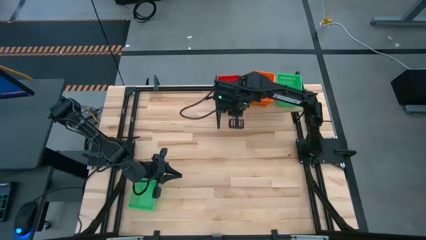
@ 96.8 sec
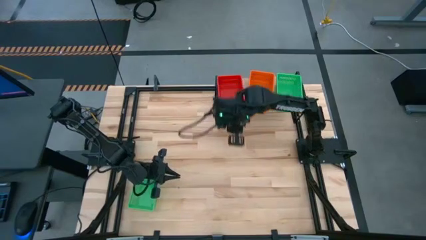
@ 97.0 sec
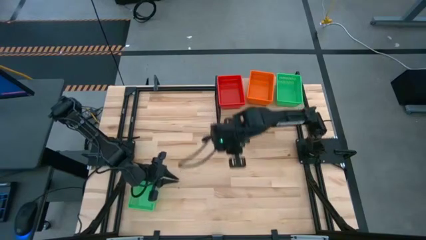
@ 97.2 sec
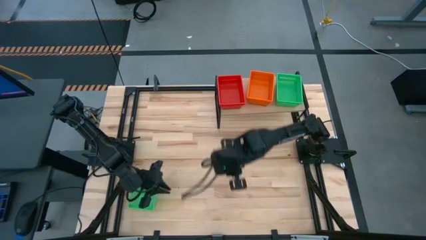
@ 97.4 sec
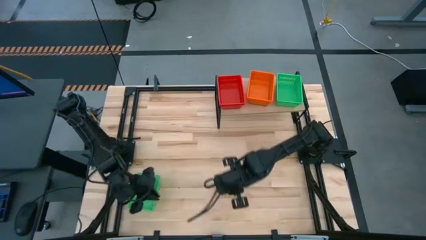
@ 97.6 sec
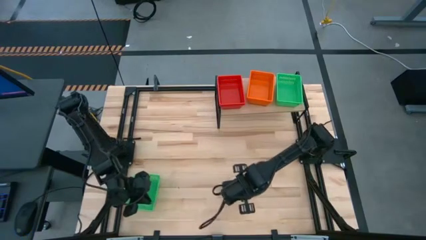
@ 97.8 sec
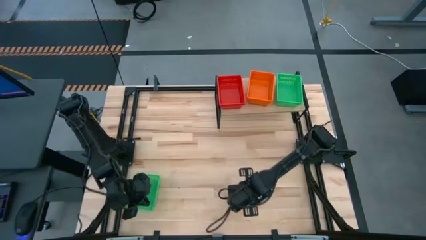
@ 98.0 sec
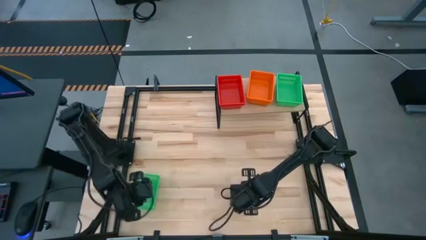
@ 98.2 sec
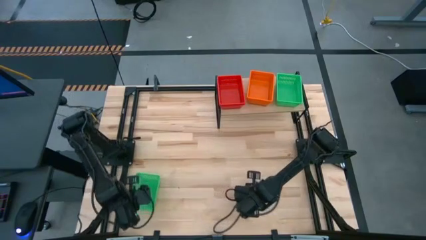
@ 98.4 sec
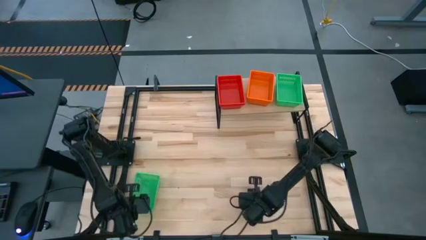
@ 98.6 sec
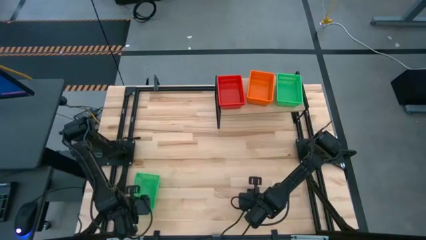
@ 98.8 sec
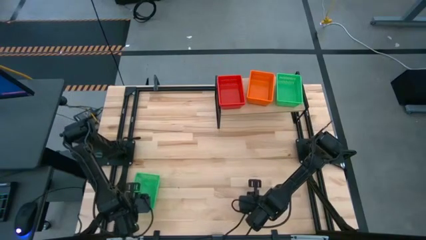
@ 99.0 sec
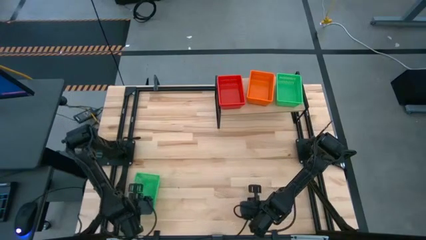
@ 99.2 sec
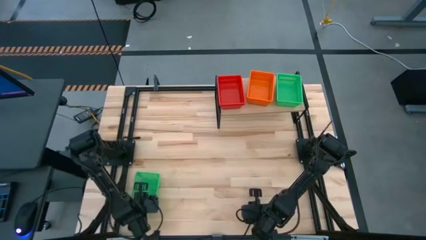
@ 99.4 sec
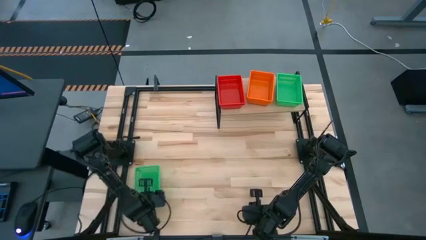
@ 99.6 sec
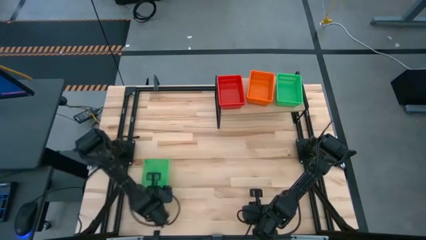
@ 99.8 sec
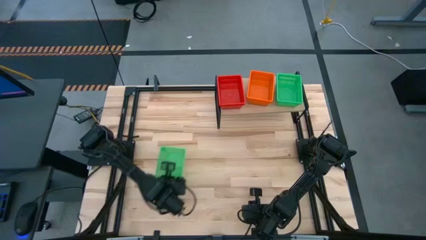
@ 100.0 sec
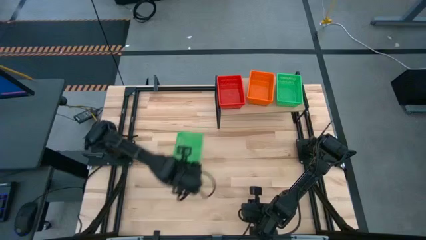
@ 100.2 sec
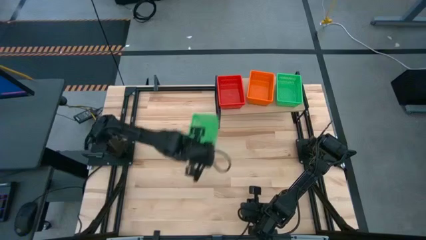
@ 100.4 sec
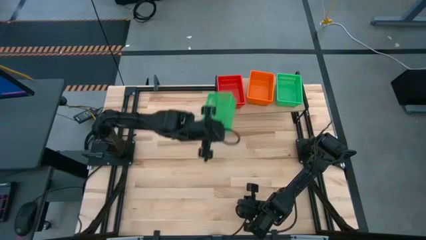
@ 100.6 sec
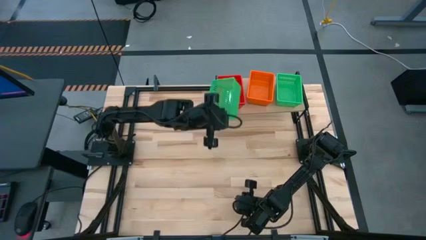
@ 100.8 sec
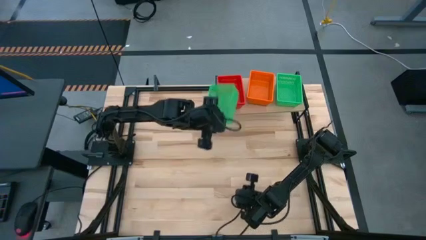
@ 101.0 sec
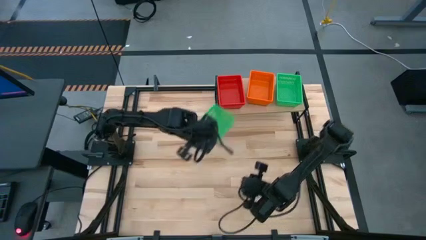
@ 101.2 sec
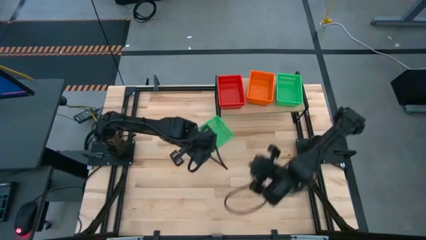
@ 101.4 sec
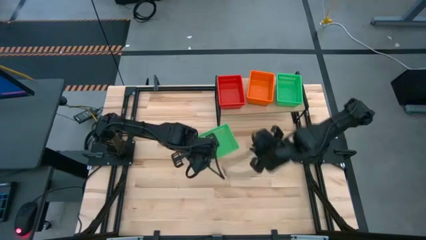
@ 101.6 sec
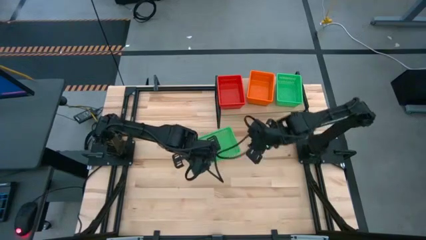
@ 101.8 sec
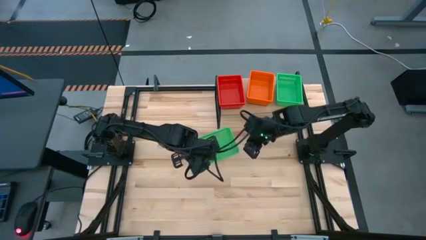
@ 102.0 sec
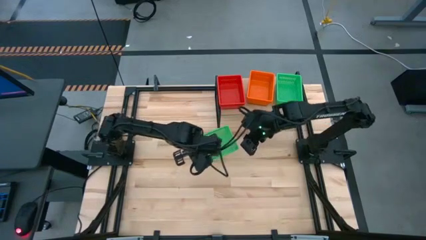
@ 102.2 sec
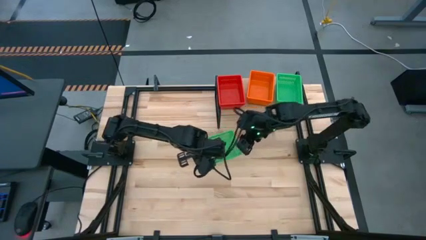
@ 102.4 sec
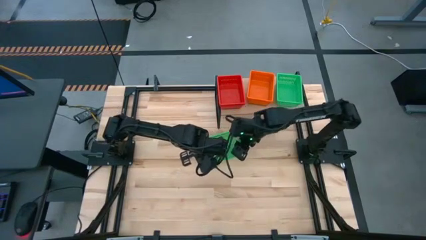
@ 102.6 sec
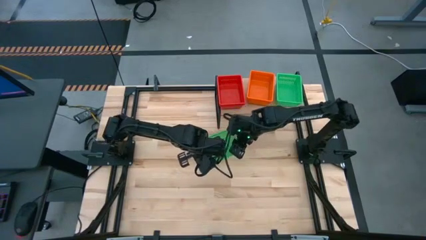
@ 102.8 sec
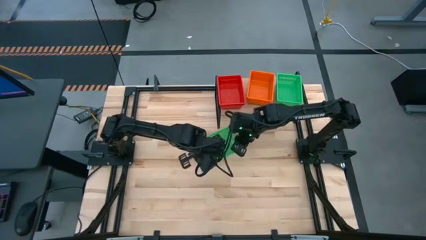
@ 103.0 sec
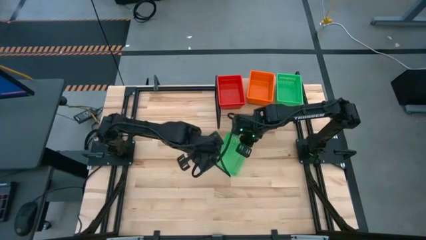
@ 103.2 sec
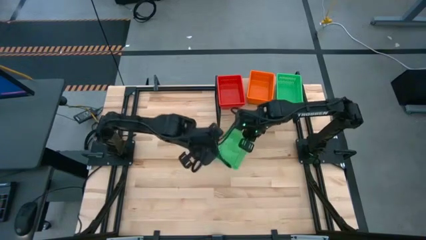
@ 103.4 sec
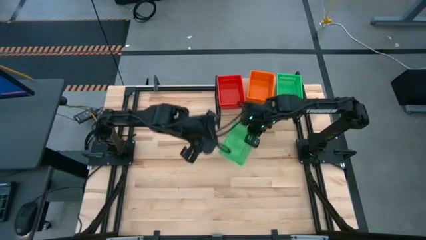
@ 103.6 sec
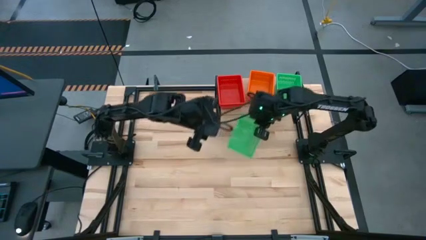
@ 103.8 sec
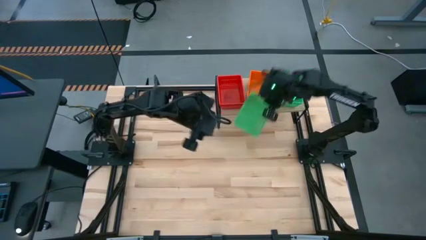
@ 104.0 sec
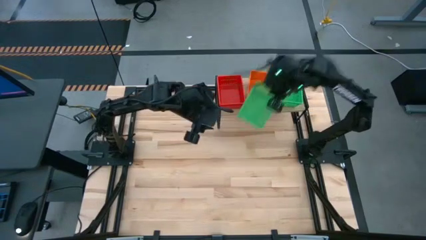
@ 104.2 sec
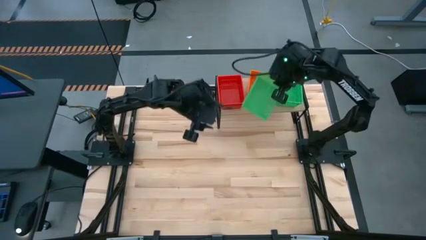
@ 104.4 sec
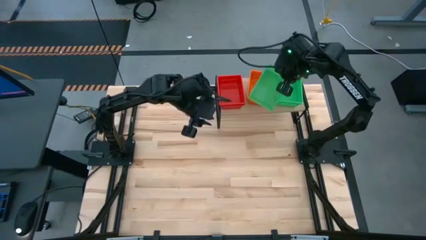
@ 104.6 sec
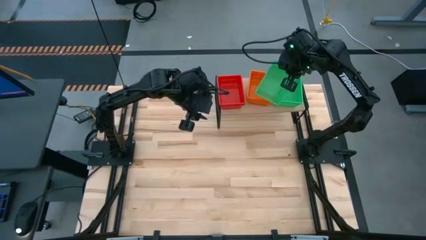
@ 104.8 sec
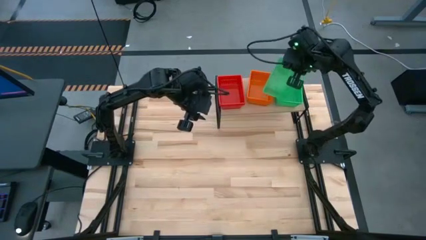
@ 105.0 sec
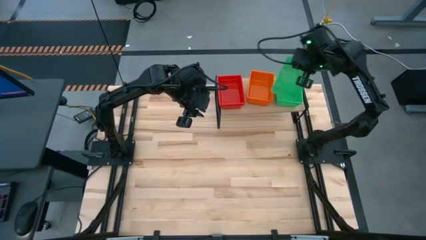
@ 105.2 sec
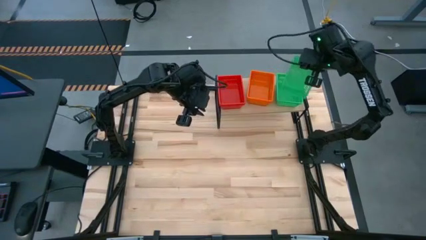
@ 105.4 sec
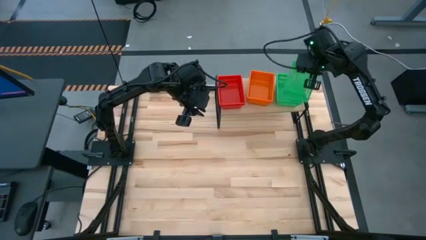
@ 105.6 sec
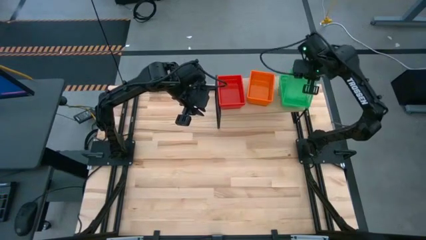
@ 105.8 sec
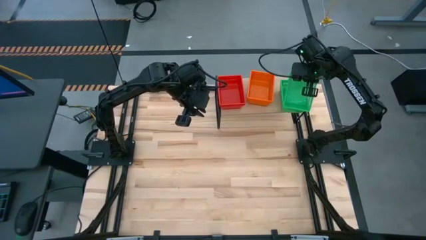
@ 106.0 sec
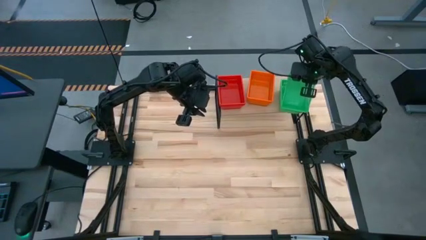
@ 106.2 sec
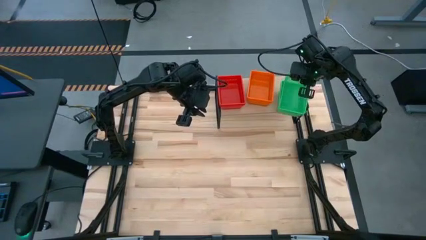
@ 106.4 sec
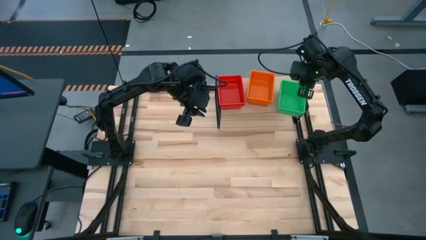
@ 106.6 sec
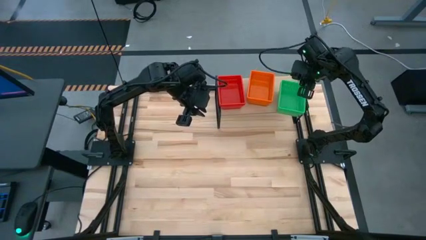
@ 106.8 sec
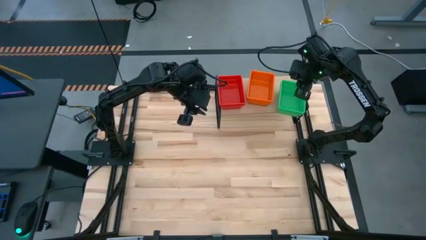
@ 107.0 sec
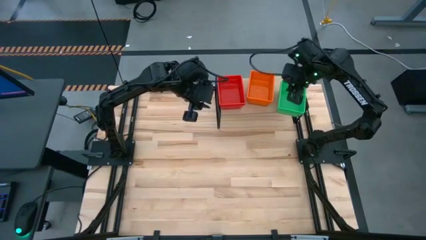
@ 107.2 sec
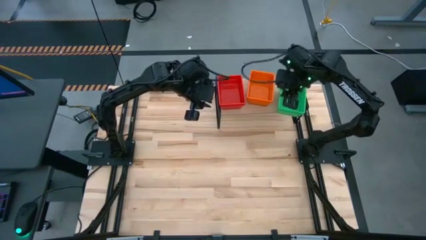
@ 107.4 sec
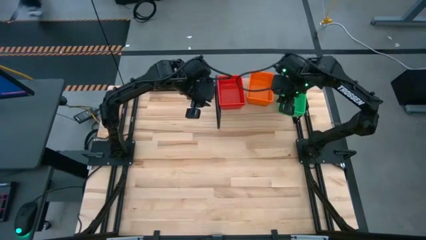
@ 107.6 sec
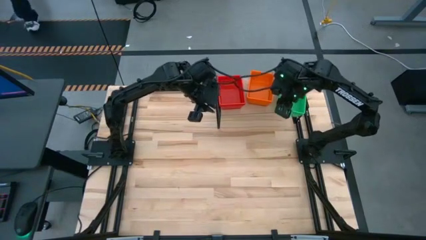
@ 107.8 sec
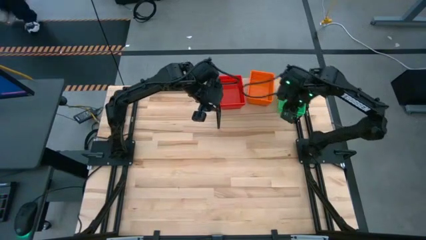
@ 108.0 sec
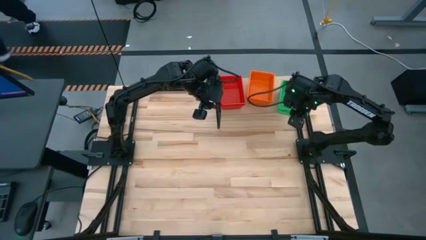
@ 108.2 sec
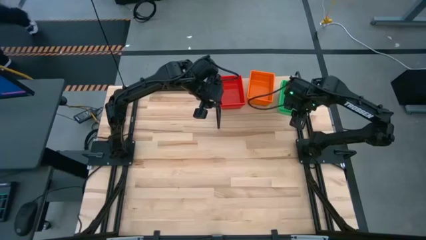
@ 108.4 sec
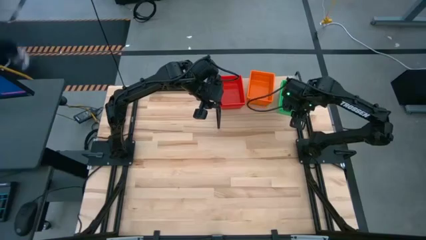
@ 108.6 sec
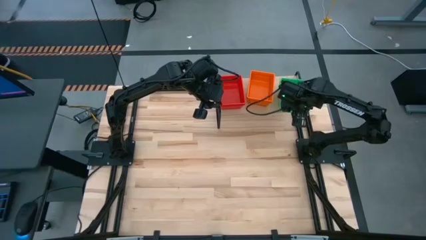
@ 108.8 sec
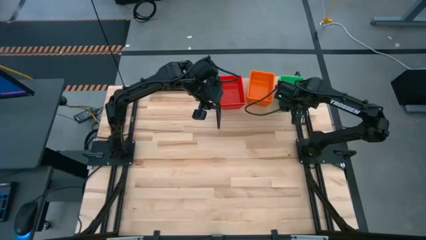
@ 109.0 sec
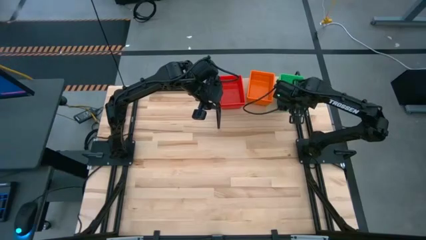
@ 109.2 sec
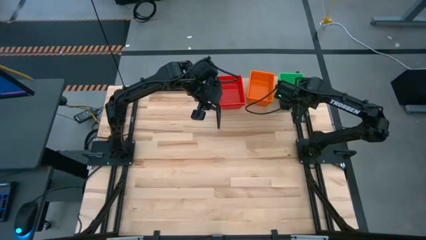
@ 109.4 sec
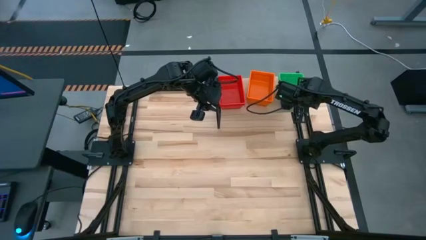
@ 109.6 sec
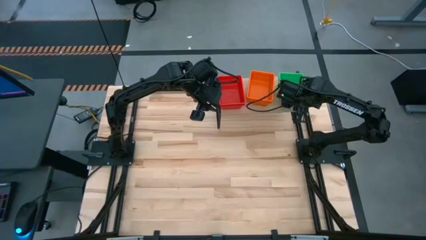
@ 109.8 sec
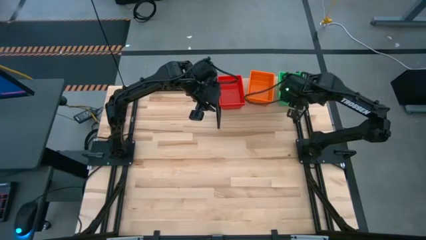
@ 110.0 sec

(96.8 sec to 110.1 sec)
Task: Stack baskets on shelf by color
Stack the green bin on top of the green bin on the shelf

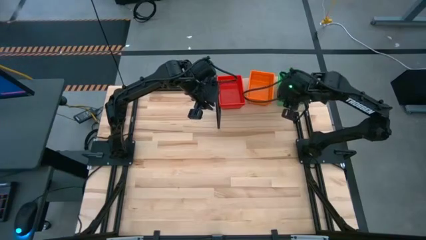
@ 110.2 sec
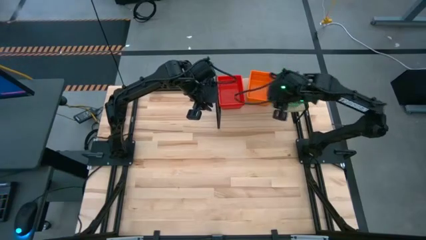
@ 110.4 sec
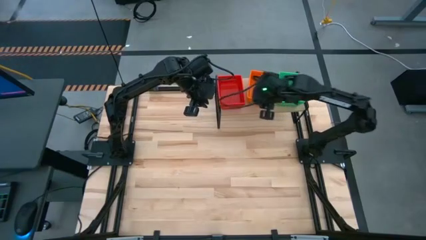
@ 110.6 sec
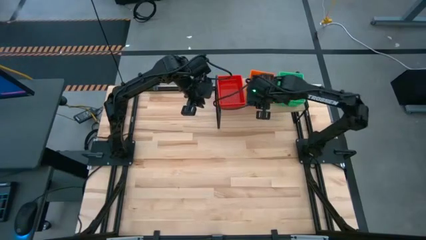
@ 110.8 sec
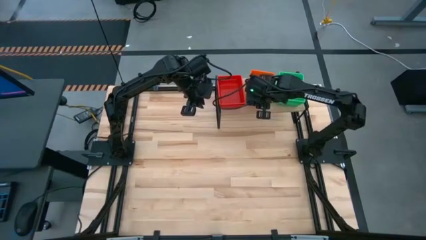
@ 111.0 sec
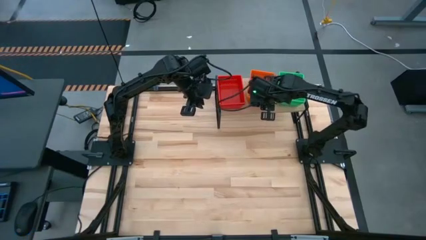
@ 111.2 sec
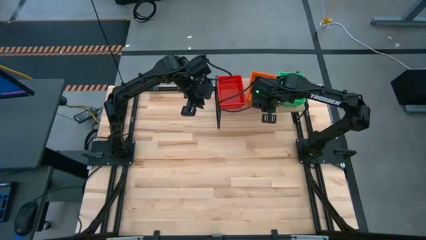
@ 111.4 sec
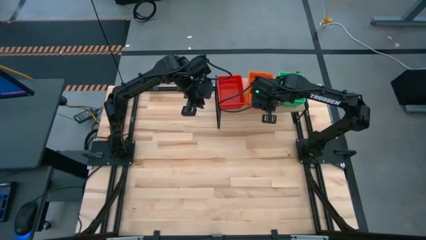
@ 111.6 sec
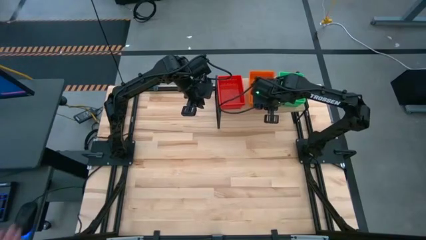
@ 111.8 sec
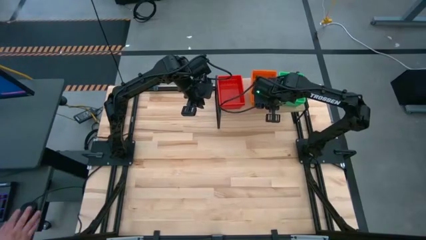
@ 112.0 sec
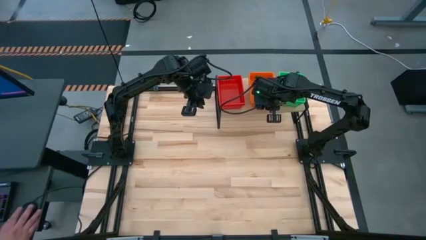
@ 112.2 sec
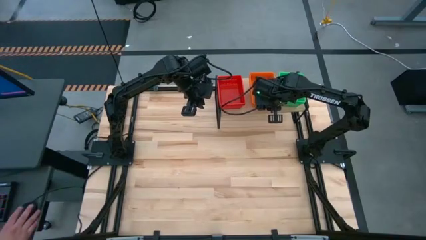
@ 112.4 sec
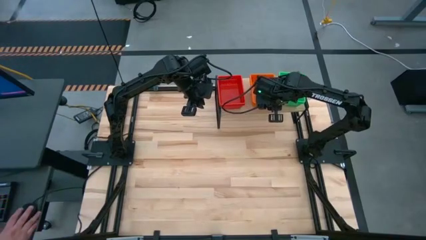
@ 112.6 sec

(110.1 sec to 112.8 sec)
Adjust the stacked orange bin
